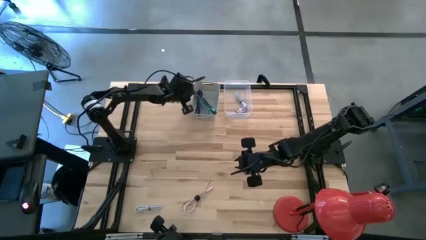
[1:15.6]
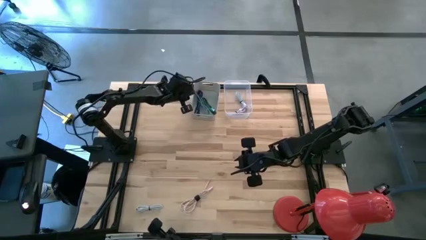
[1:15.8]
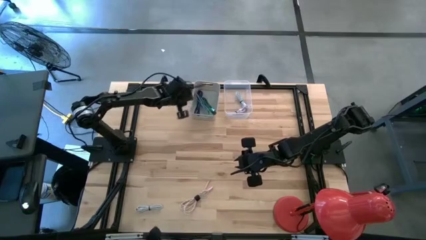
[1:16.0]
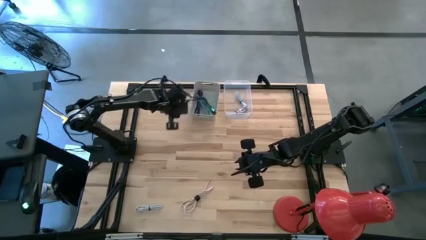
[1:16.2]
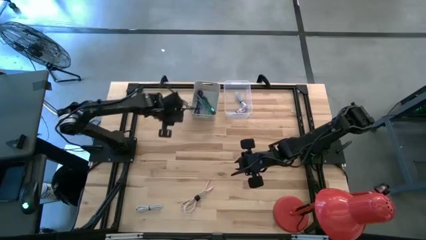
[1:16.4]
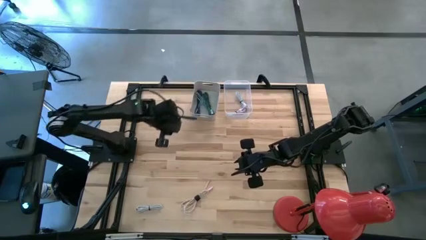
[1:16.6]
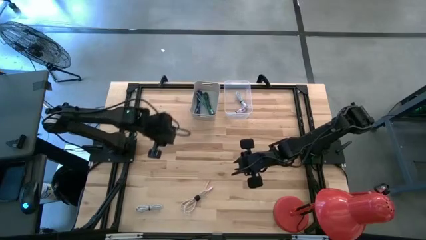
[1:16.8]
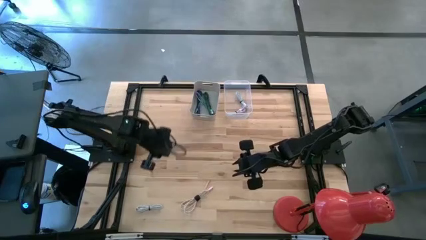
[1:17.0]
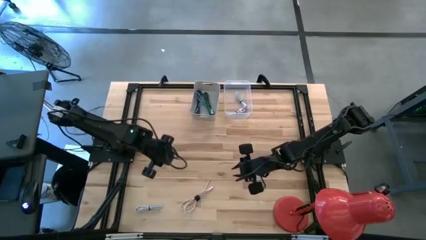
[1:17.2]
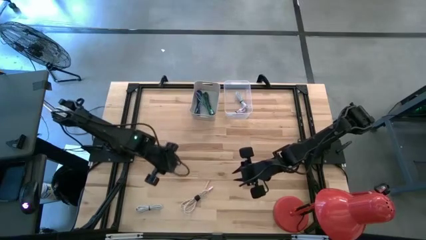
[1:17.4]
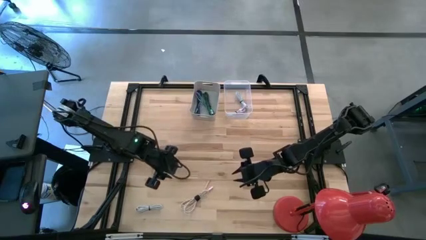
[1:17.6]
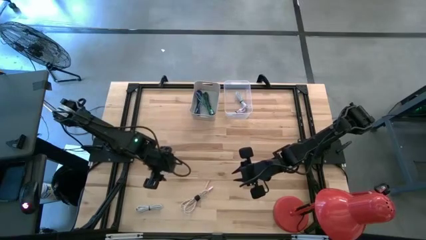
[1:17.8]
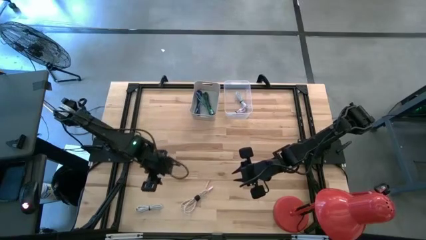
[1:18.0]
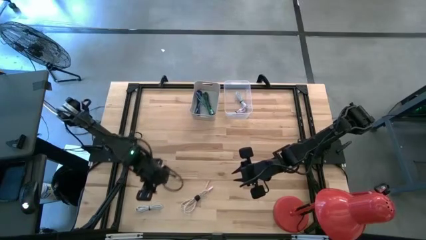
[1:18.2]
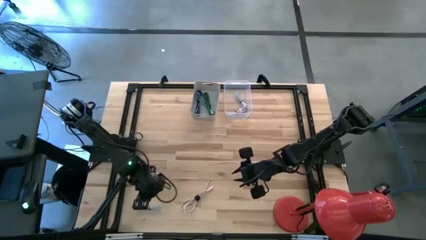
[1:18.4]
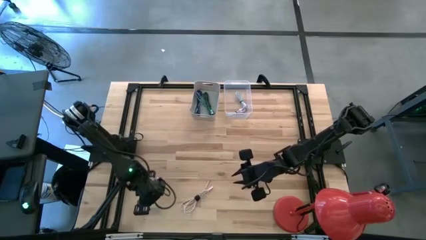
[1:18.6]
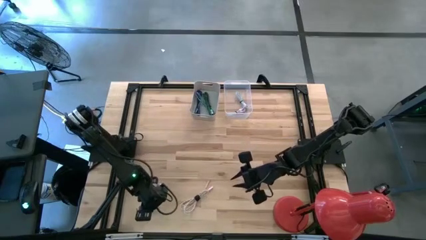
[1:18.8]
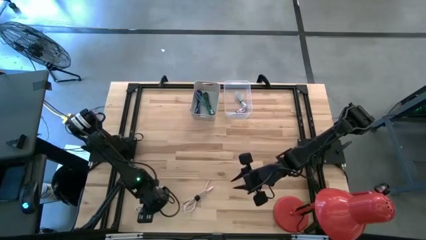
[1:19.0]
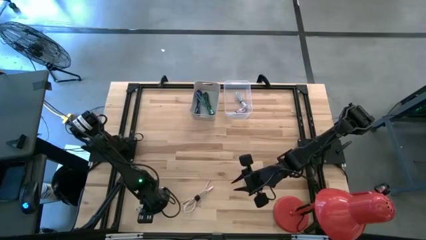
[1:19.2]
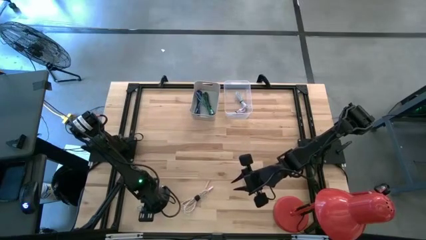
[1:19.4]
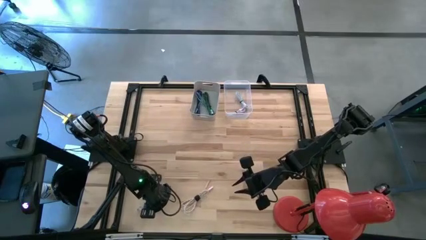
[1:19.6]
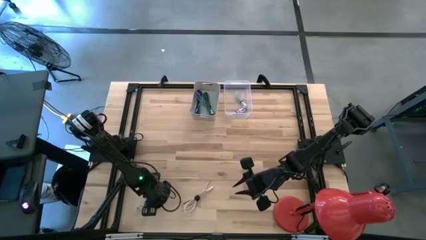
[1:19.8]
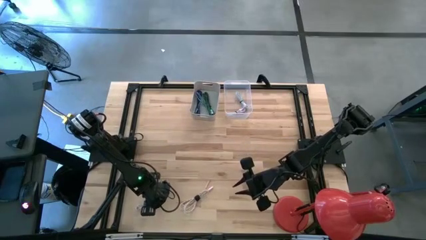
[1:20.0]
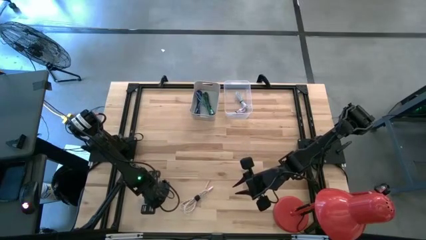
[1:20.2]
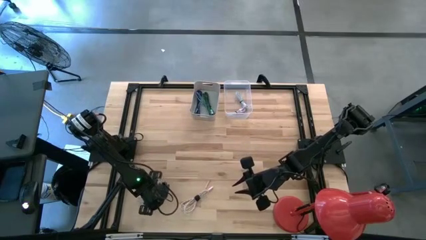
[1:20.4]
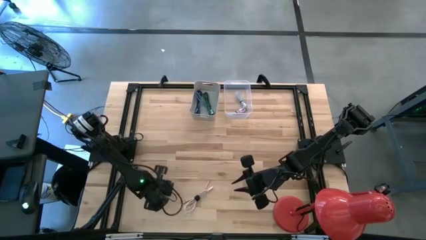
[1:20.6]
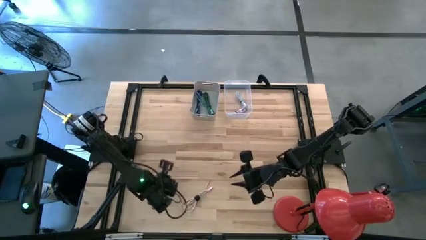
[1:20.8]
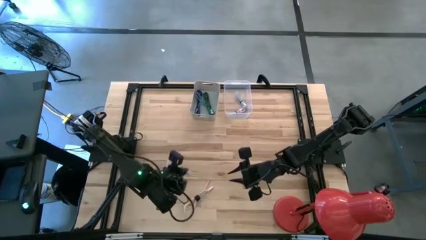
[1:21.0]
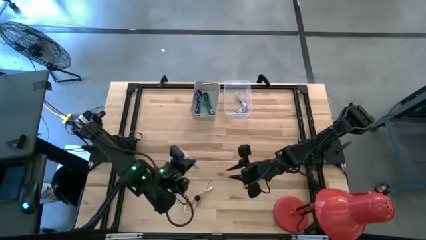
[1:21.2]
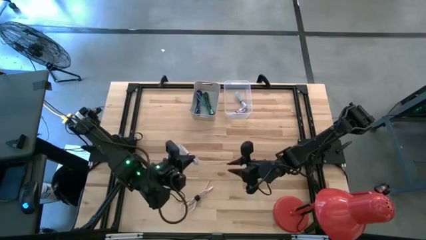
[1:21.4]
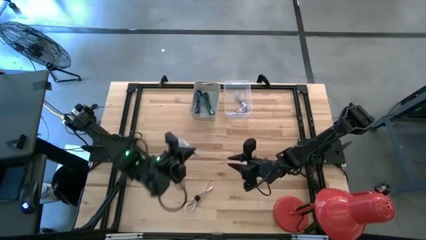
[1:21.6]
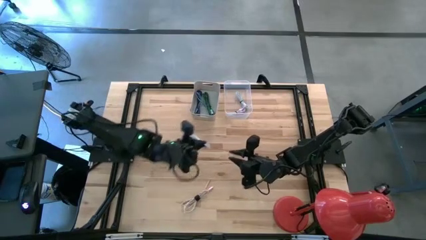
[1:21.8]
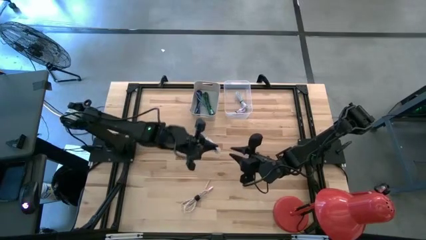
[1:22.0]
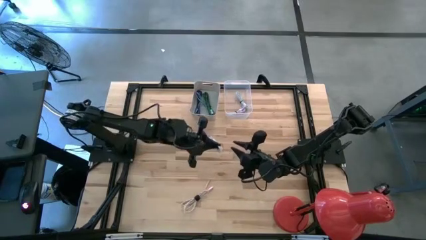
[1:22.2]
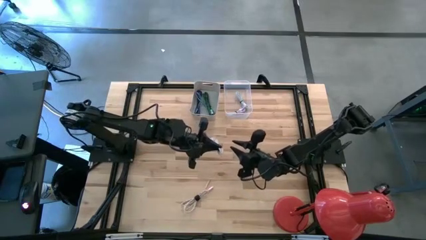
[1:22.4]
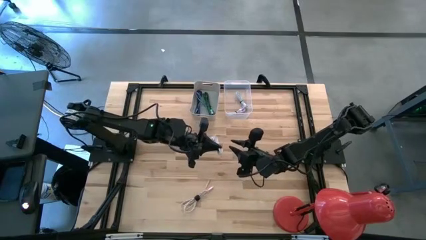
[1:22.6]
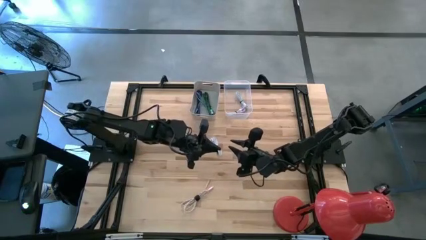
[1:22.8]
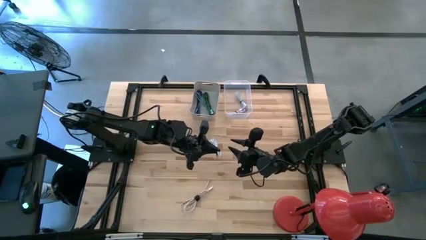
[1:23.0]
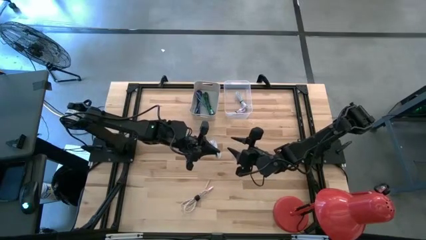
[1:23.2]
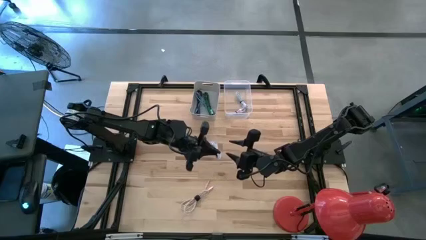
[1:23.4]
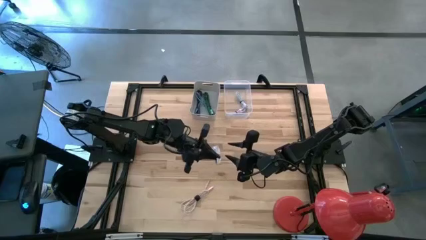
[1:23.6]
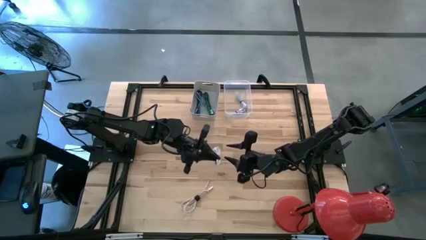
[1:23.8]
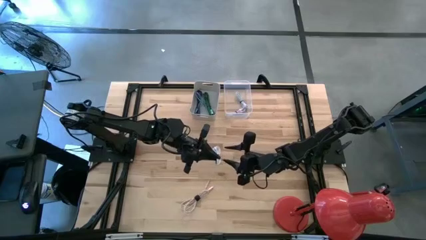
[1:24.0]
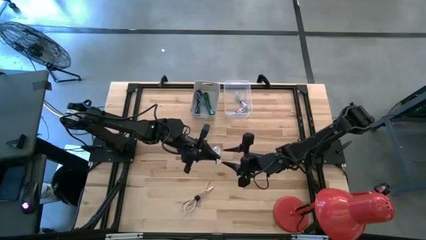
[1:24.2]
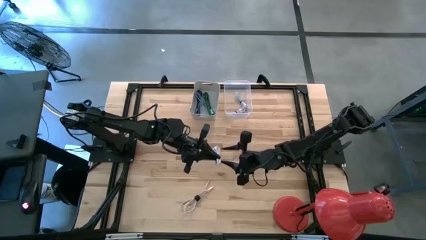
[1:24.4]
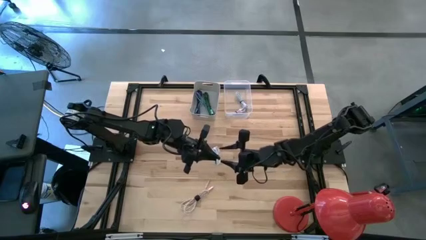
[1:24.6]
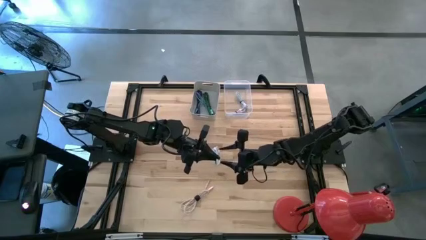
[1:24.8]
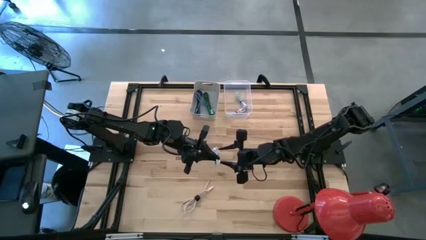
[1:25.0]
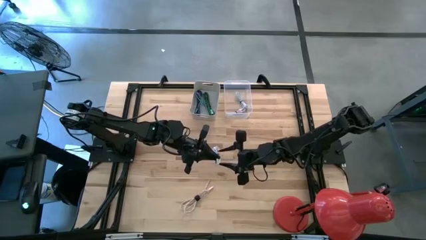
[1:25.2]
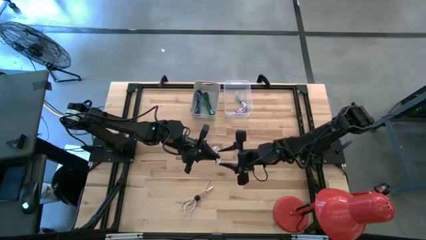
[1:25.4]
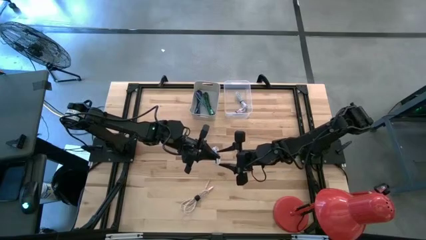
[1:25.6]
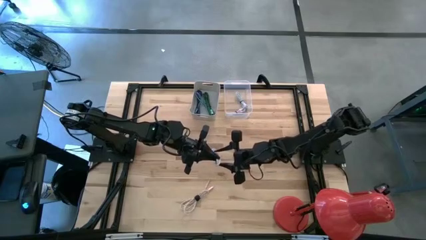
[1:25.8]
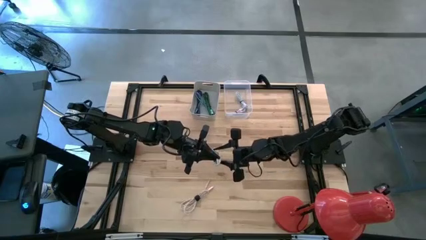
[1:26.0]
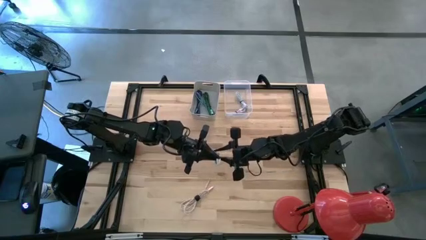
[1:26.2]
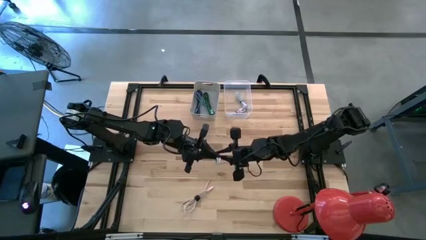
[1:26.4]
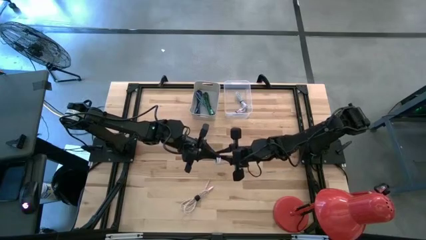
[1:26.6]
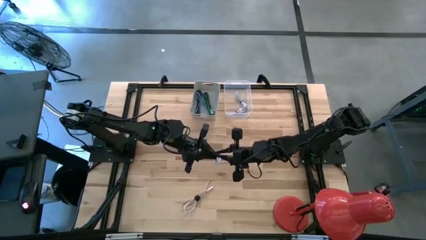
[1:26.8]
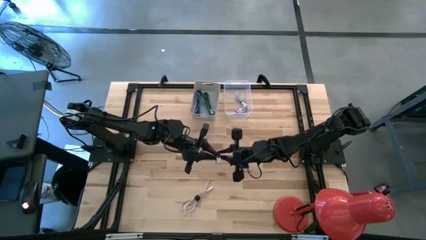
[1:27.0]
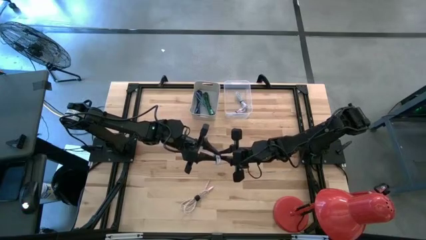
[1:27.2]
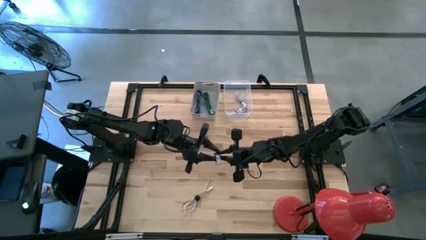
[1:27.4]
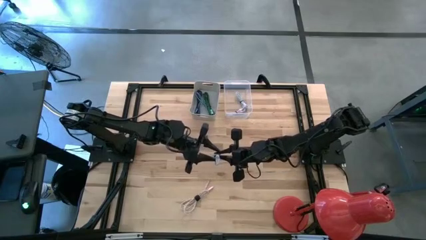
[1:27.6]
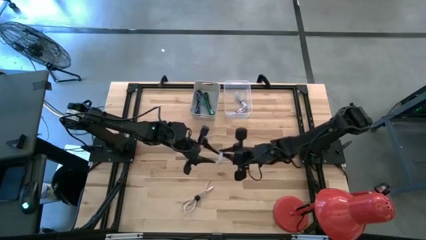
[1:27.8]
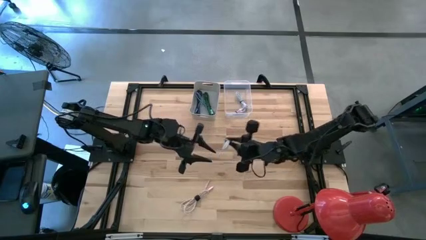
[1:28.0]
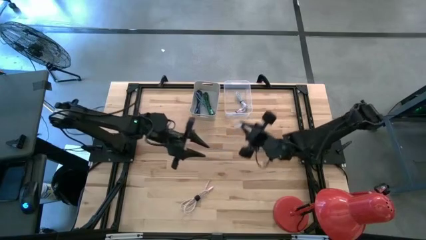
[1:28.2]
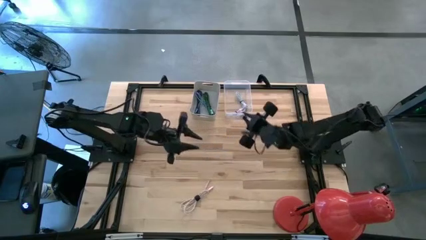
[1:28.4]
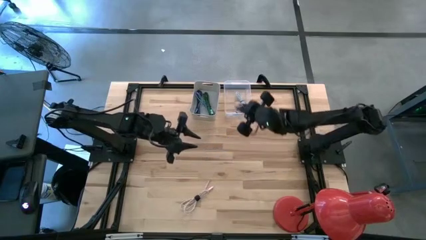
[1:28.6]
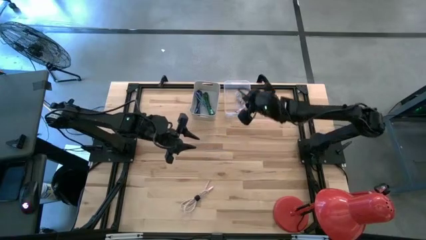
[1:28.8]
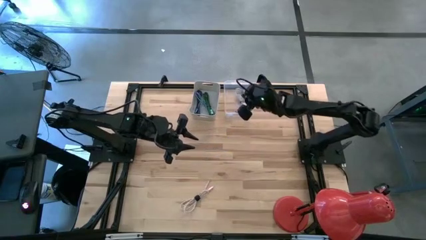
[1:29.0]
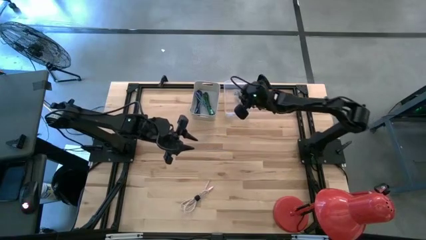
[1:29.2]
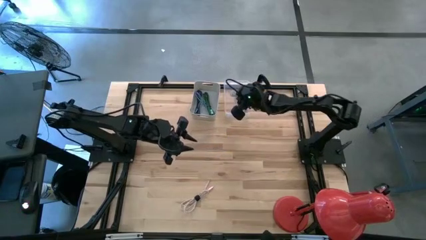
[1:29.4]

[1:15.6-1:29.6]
Task: Pick & Place USB Port
Put the white charger cable into the transparent bin
